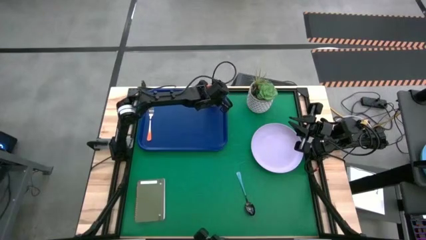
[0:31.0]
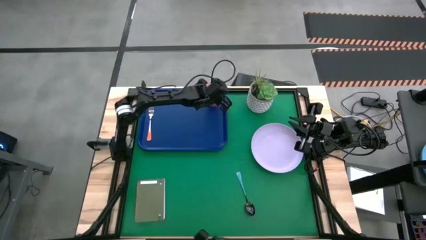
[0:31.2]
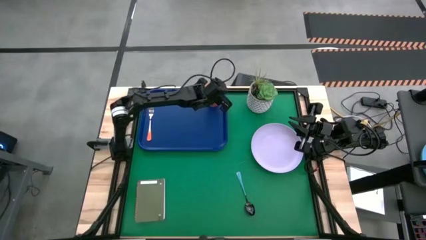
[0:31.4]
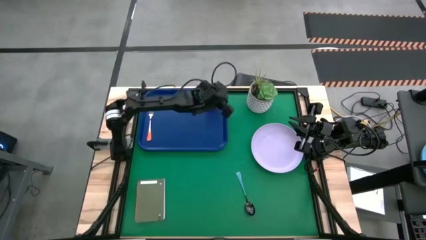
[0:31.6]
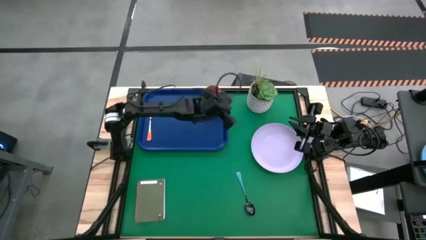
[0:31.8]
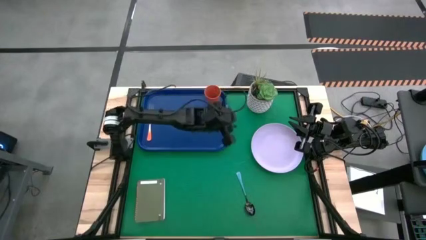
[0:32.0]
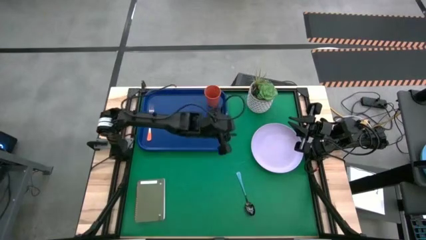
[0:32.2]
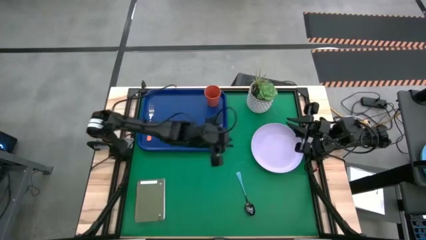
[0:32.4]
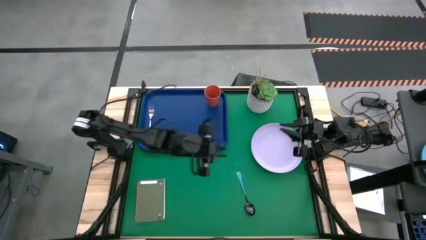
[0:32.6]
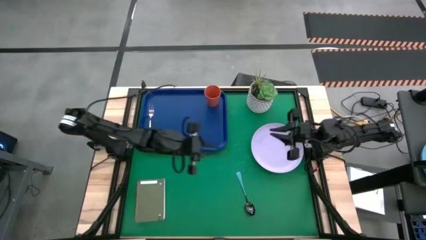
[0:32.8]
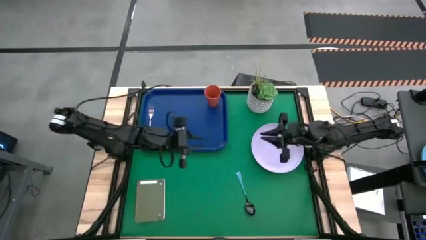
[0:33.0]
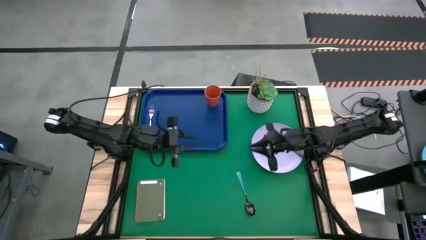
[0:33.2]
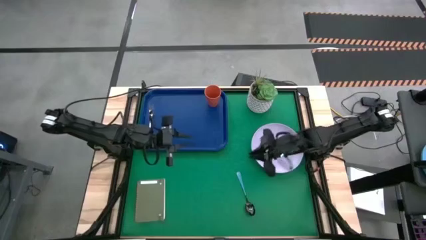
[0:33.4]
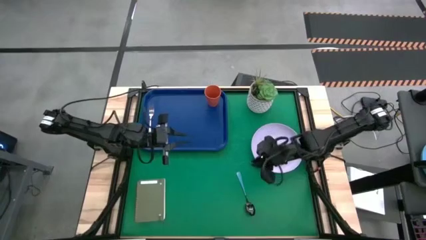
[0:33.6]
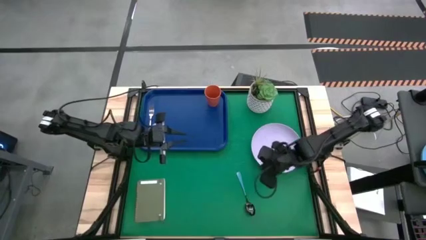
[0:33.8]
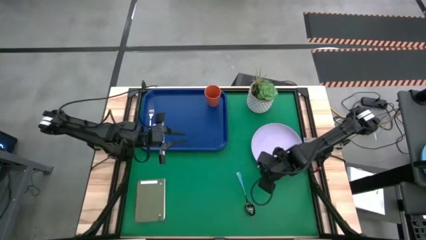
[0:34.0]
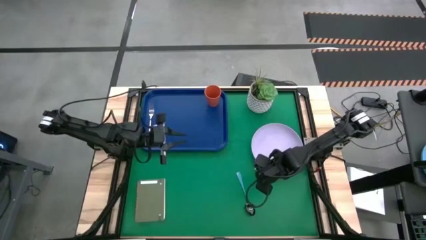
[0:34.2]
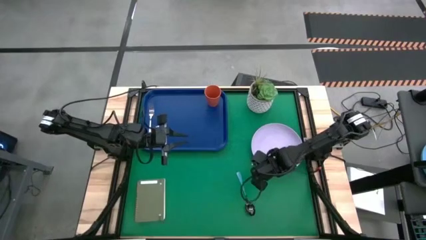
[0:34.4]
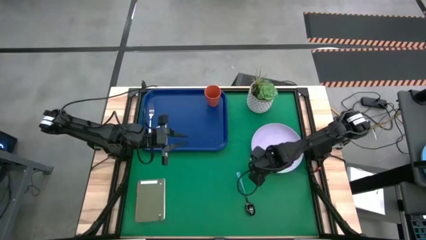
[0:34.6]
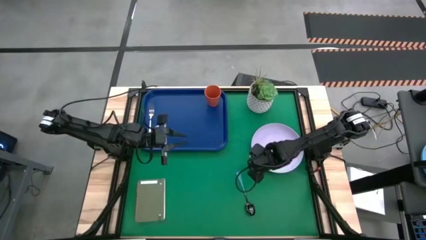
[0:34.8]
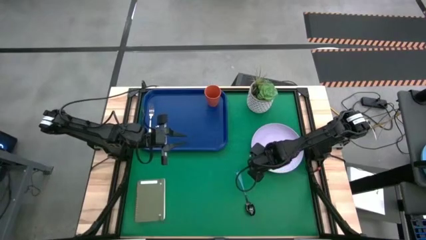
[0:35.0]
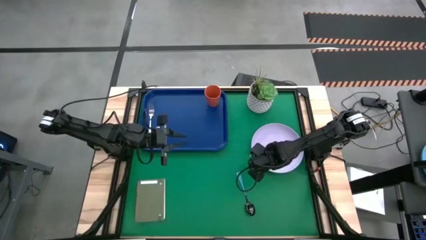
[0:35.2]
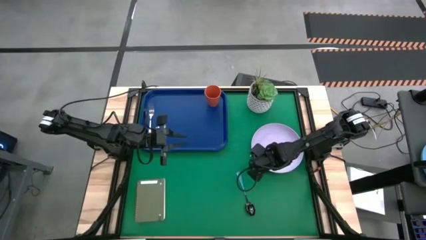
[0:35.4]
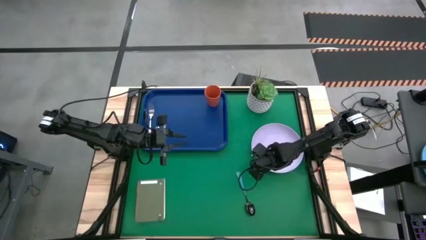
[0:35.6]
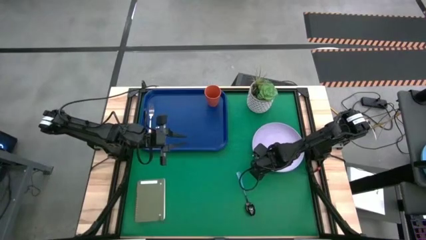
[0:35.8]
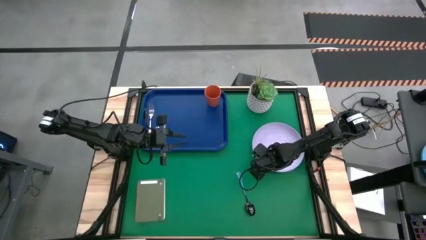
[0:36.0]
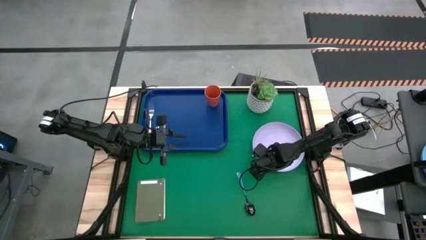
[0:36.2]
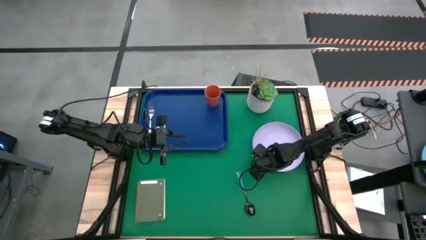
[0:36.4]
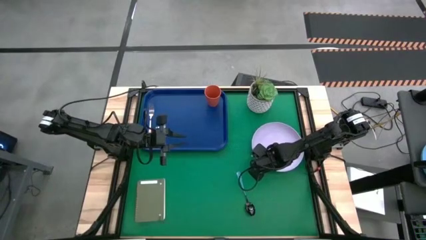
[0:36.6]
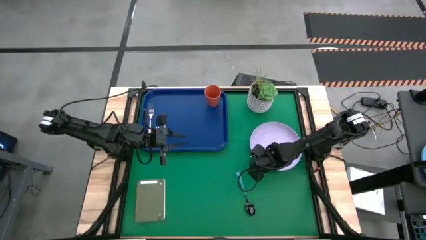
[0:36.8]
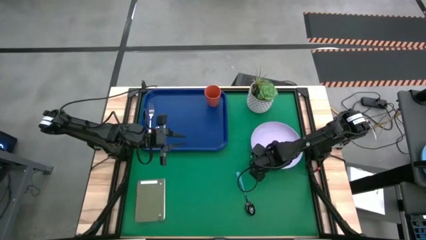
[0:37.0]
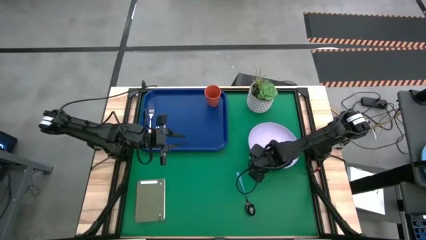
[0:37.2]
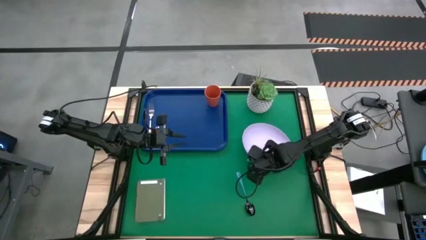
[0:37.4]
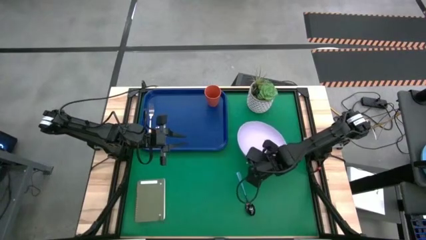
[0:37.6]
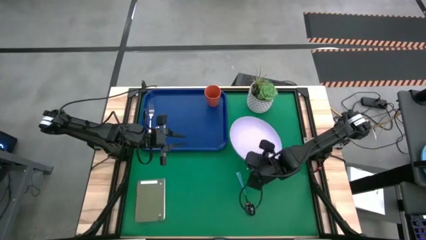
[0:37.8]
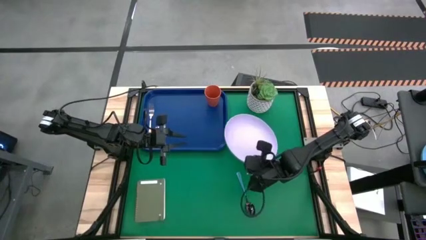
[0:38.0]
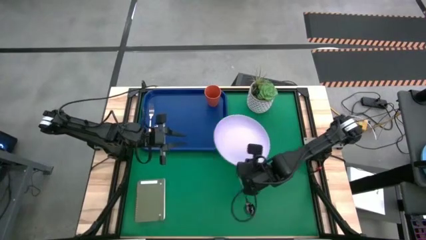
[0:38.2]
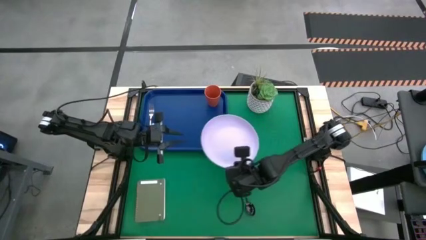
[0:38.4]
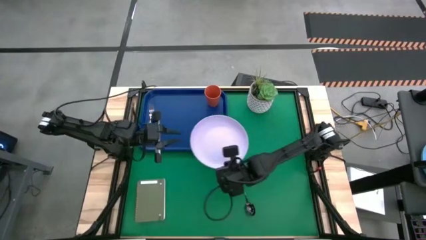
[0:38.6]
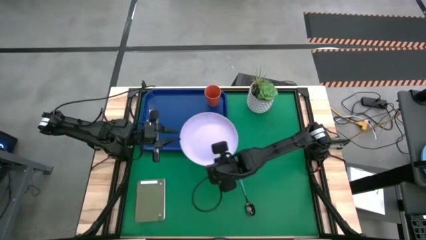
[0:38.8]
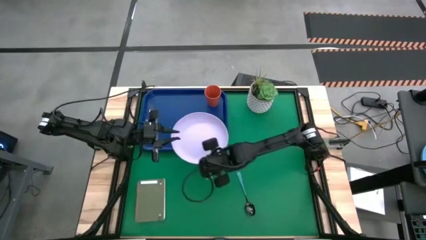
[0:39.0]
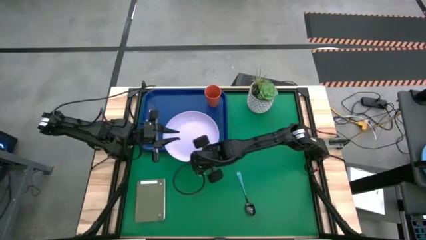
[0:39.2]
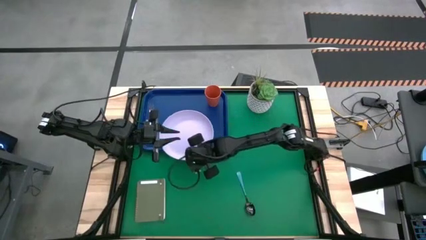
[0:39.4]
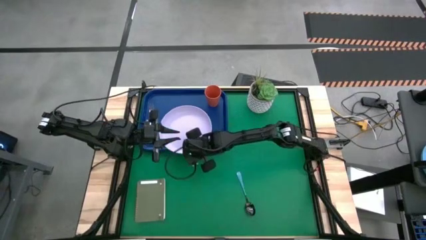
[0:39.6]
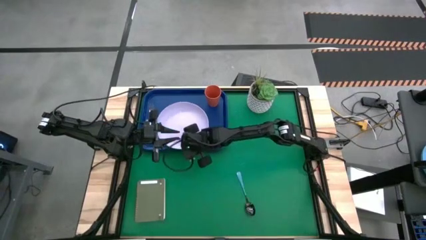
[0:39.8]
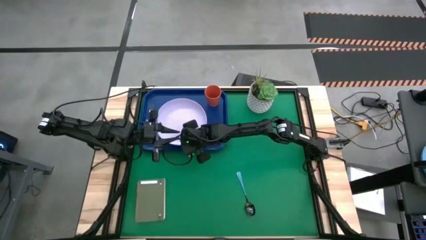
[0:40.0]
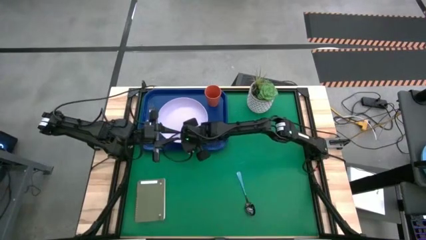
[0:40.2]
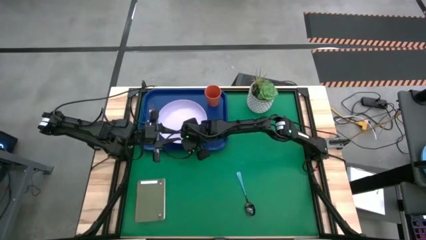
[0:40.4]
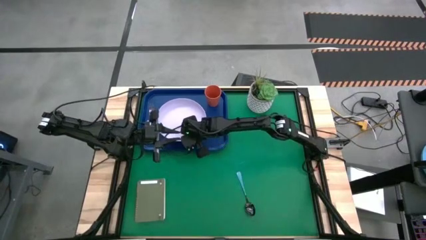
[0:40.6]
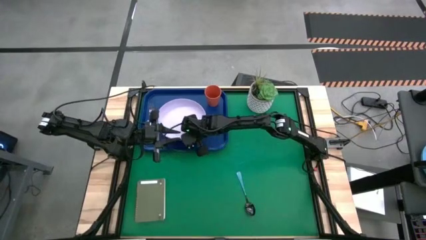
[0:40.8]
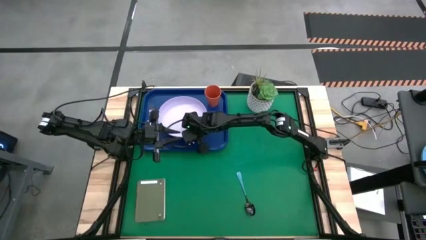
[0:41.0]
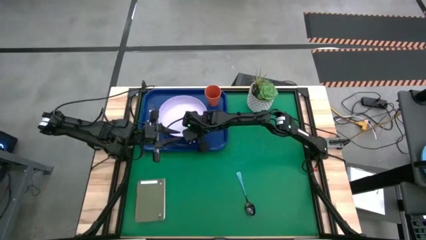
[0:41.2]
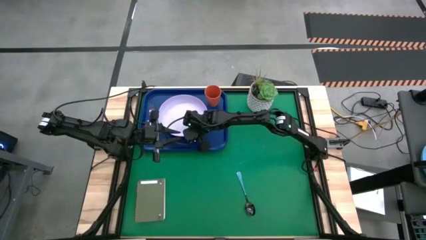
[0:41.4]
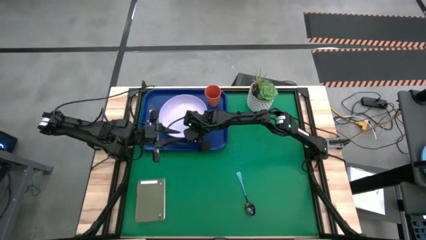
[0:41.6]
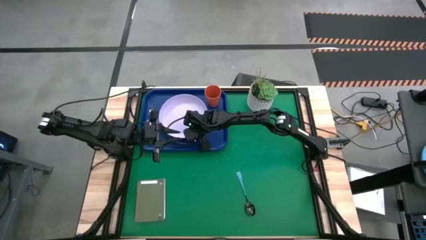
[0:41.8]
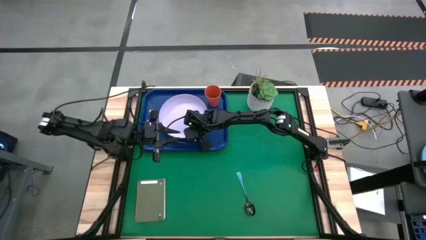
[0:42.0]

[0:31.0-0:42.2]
Task: Pick and place plate/cup/fork/spoon on tray
Put the white plate on the blue tray

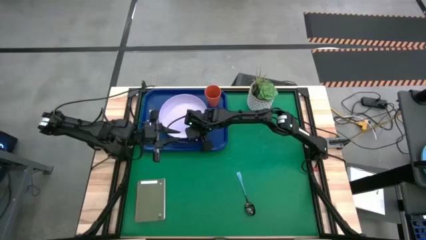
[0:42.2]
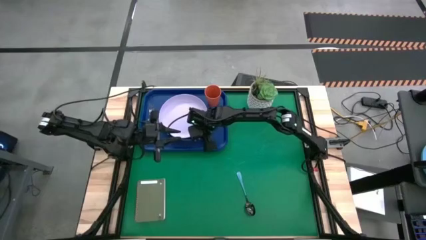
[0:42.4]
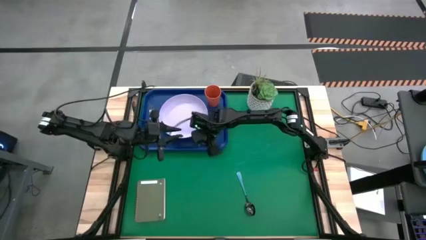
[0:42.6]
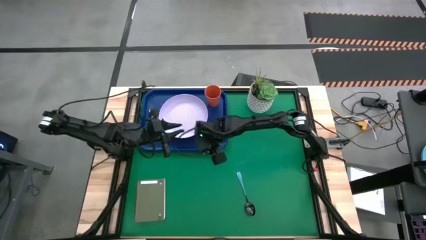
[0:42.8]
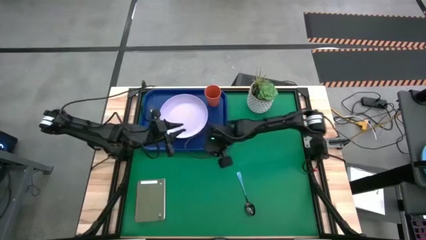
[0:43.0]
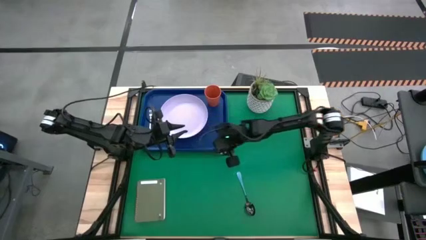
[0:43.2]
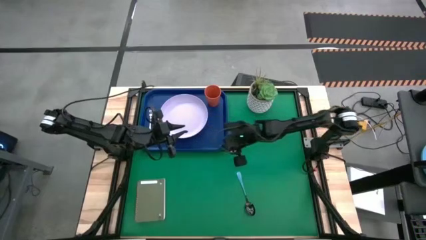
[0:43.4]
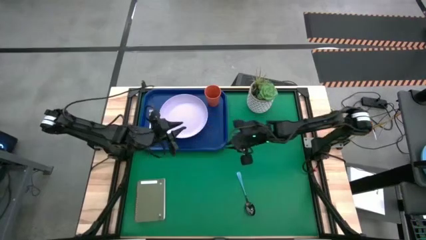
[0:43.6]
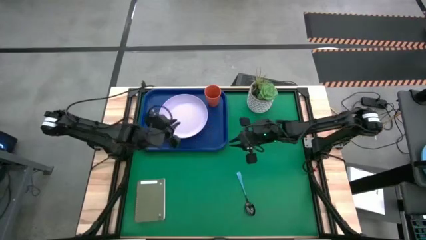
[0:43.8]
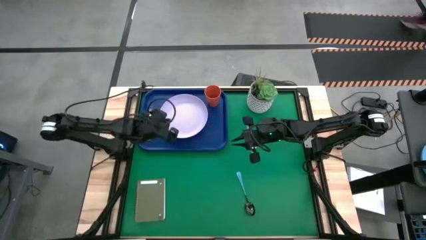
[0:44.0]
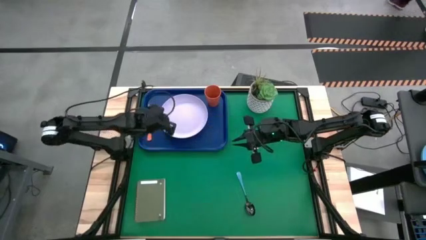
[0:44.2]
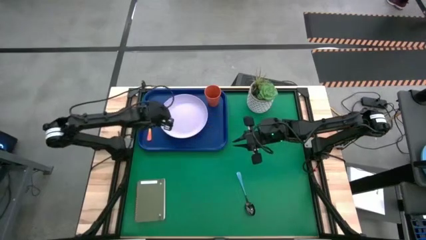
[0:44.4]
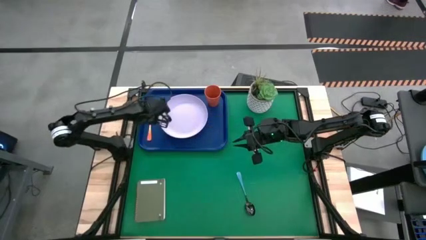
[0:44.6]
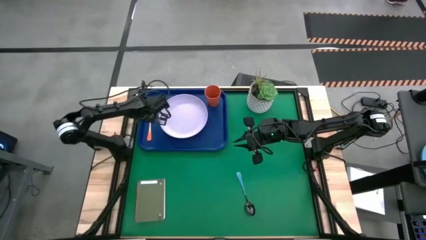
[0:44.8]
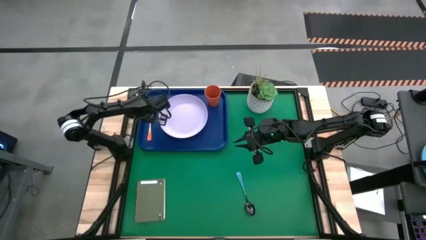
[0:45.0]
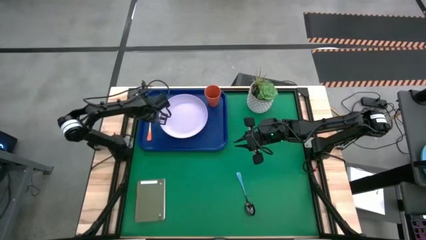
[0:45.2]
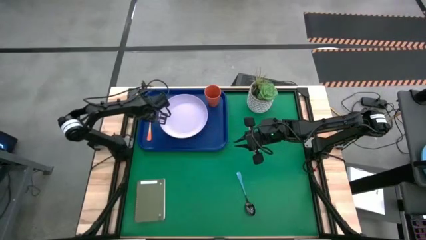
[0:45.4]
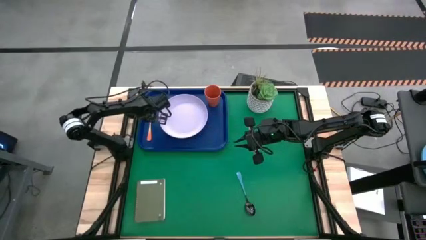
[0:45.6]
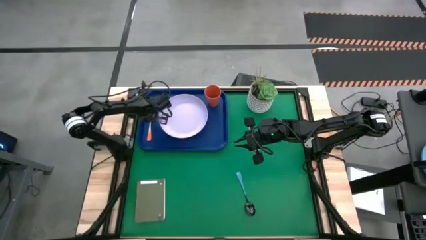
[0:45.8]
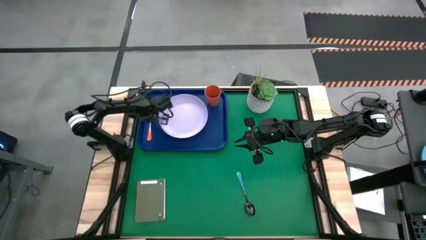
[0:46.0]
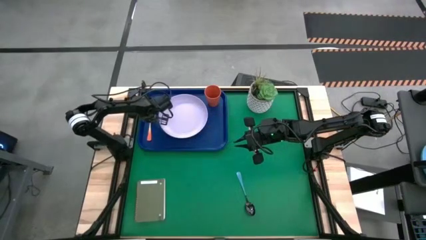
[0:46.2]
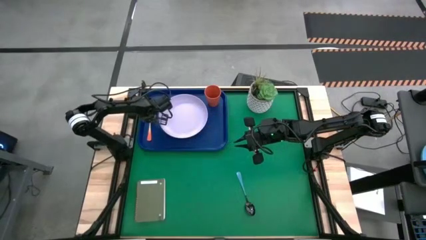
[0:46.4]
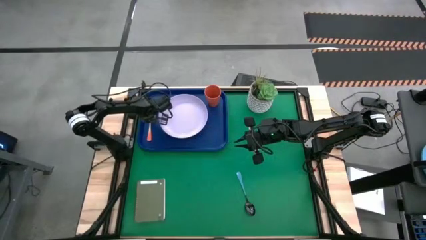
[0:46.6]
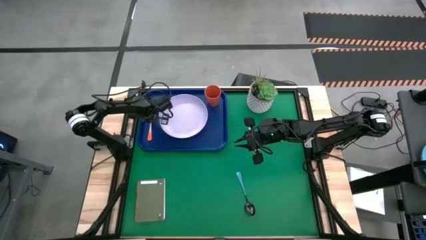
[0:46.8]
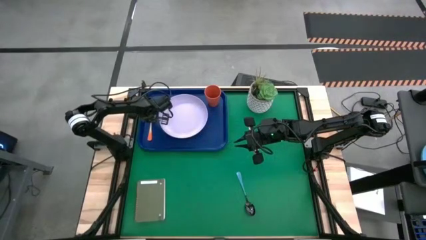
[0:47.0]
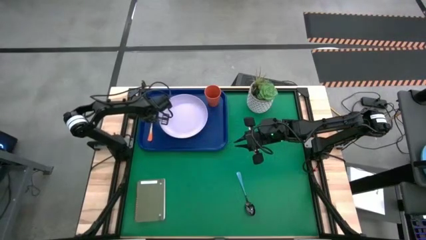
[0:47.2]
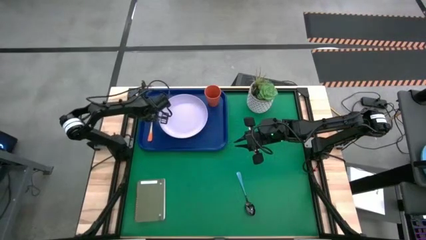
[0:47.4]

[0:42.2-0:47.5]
Adjust the orange fork
